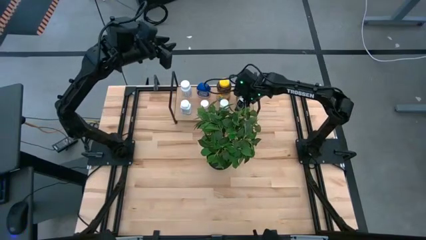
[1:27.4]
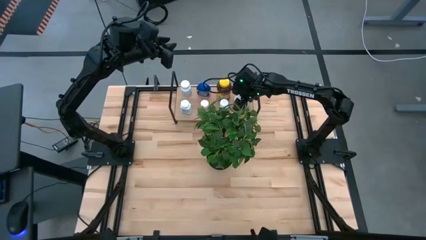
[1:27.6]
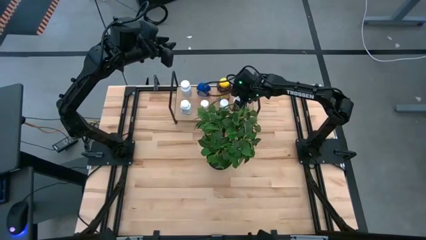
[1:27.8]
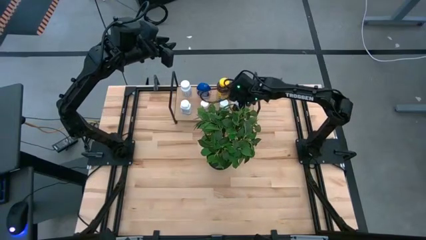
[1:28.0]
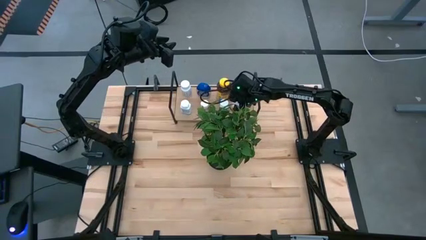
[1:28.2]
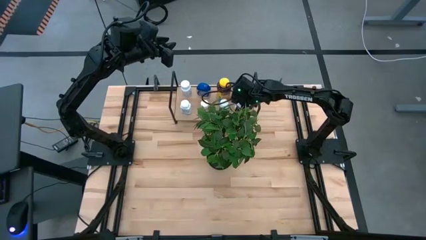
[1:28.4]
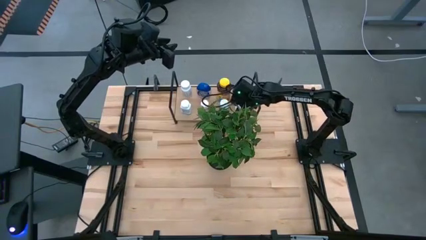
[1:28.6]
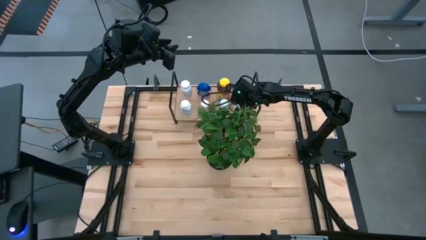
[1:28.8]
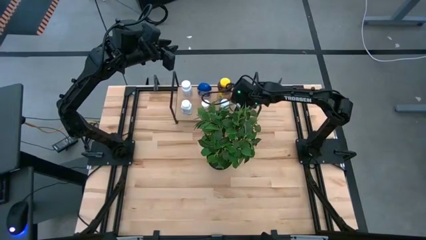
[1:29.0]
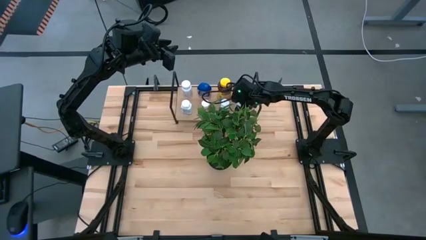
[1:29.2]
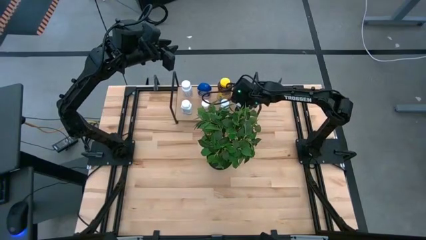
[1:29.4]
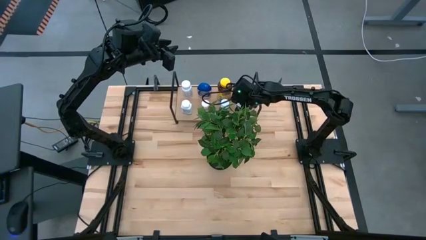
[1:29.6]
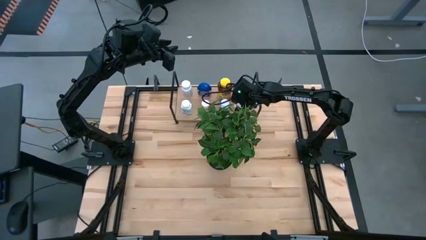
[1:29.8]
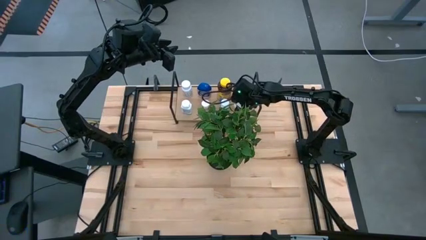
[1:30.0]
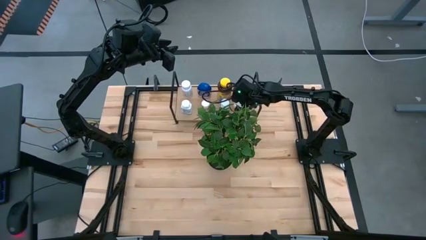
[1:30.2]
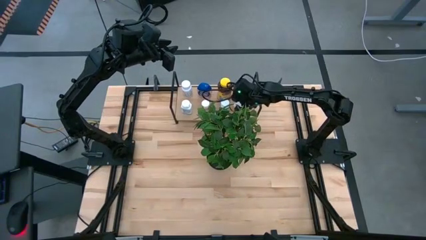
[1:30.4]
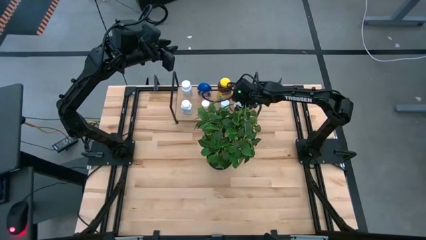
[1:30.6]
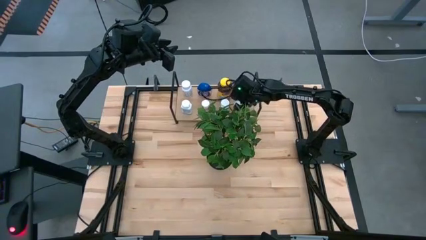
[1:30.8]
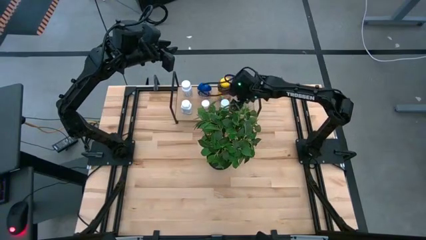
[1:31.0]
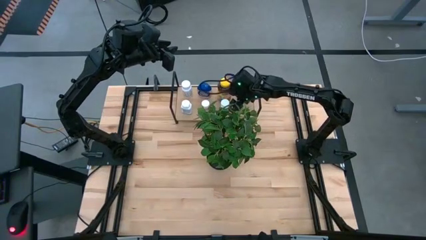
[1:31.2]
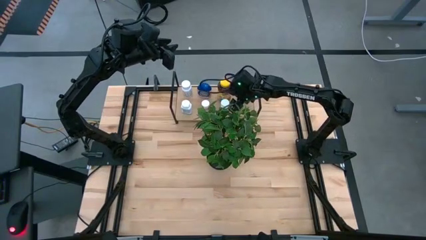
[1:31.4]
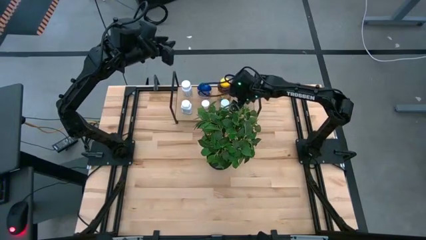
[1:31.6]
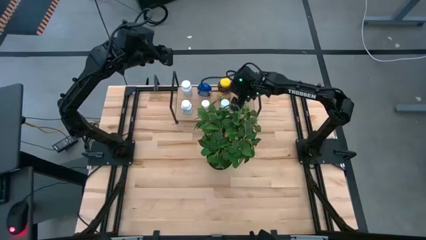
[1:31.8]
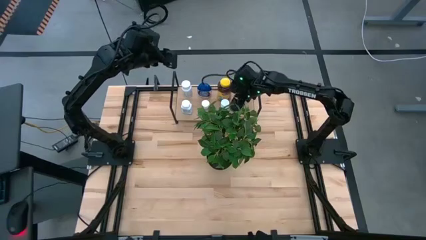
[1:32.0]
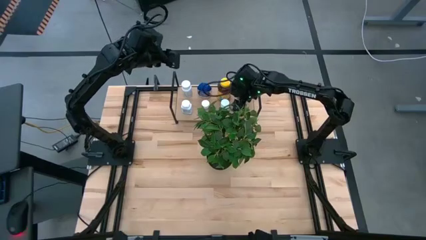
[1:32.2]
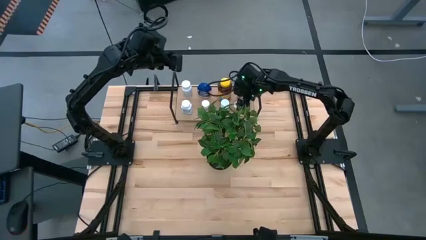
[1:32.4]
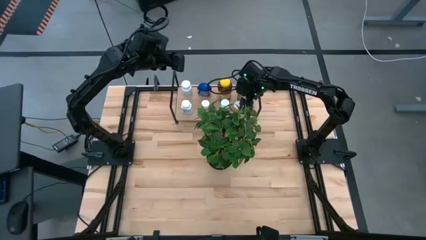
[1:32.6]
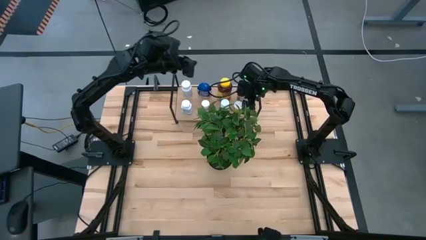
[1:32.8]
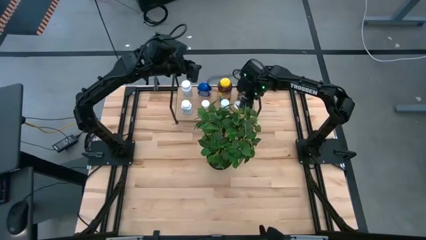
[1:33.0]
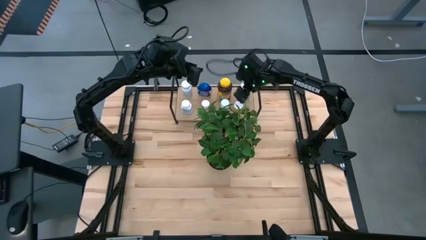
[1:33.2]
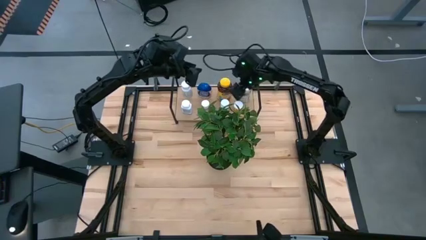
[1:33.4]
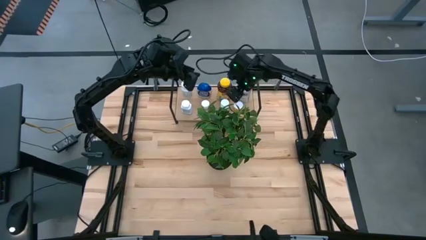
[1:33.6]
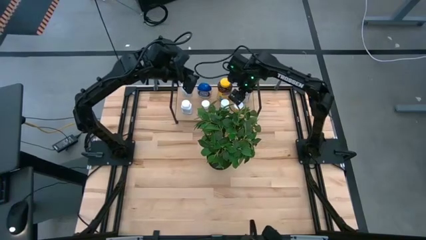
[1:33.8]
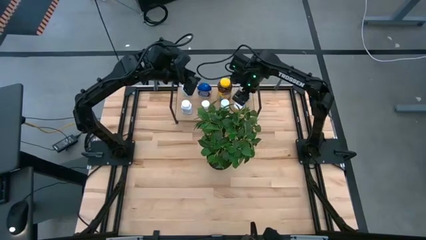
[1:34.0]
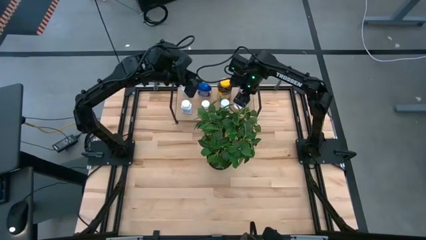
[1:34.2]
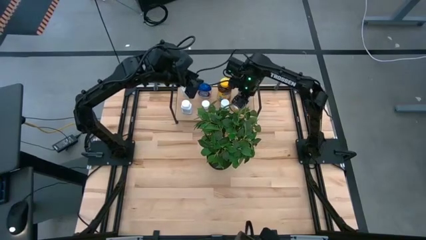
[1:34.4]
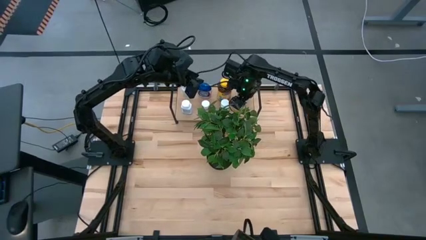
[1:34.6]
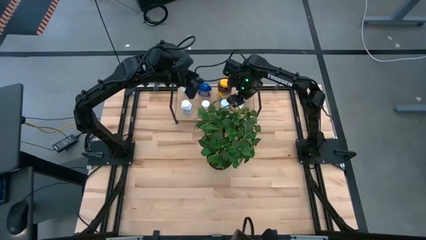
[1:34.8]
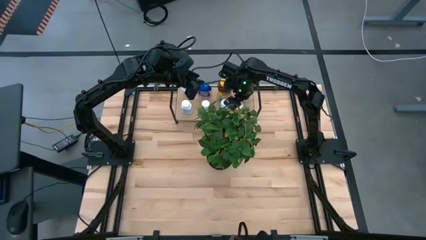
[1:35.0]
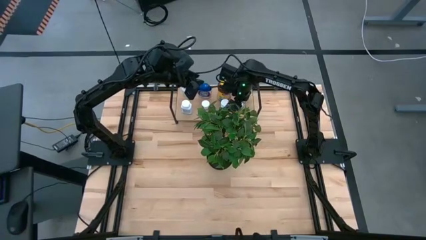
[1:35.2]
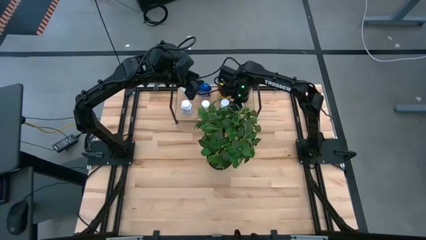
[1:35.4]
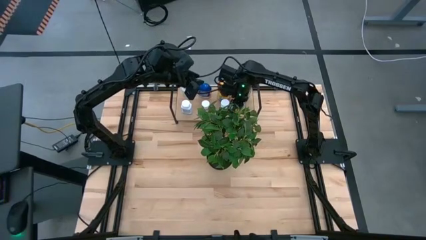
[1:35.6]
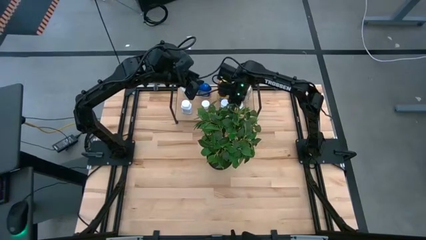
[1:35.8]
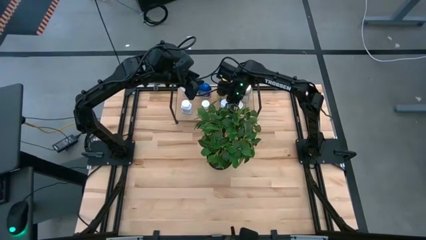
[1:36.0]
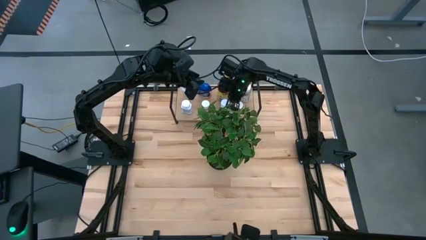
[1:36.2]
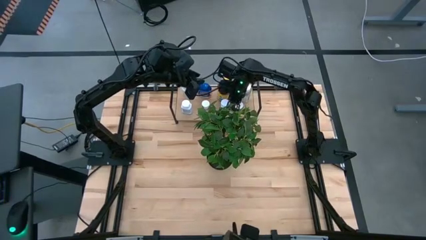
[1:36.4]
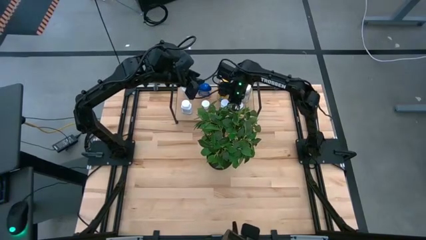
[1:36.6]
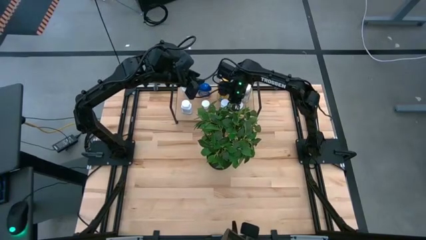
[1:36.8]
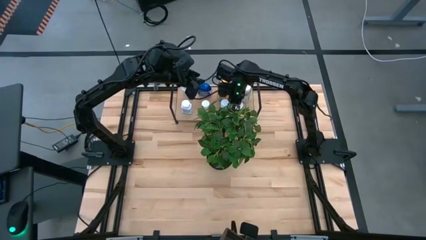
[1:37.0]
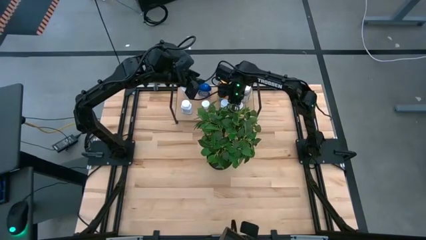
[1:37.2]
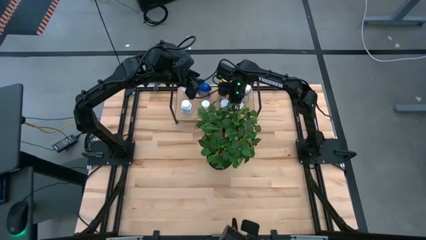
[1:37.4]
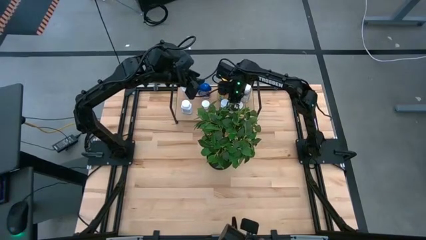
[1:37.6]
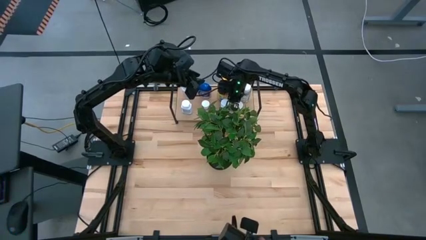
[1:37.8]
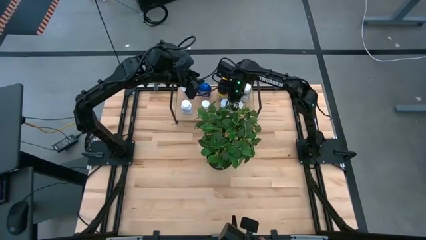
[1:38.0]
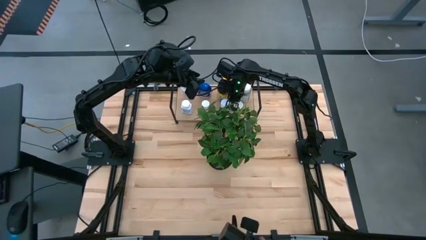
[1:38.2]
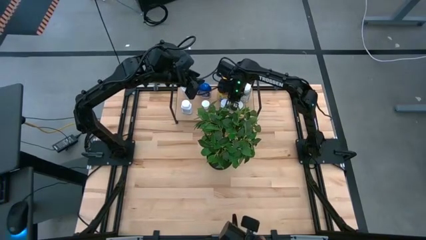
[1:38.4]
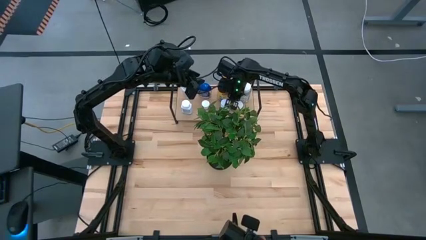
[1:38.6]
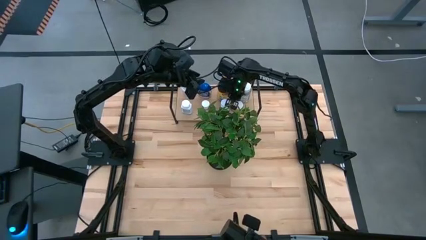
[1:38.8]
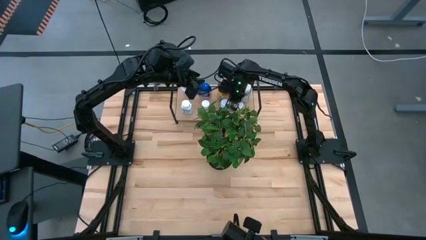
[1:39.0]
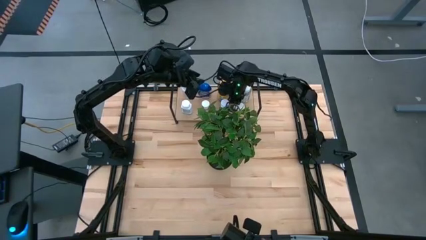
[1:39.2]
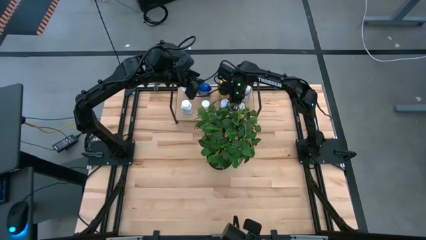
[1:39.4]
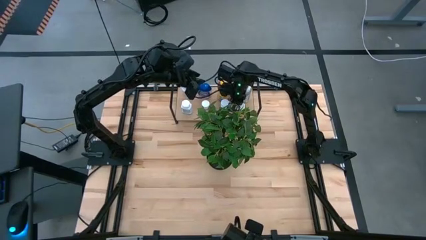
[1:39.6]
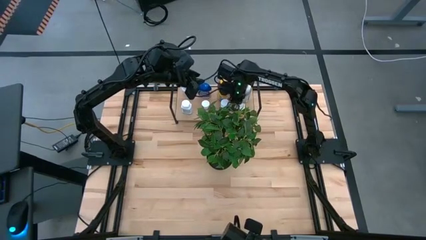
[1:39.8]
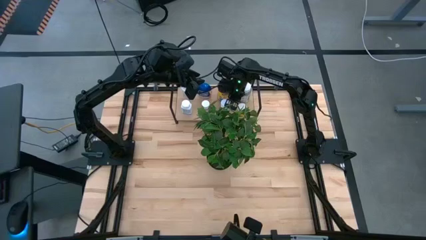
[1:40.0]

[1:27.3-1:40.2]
Task: Pick and place medicine bottles onto shelf by color
Put the orange pill bottle on the shelf
